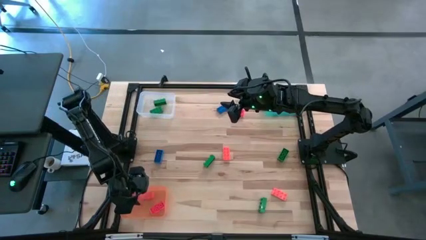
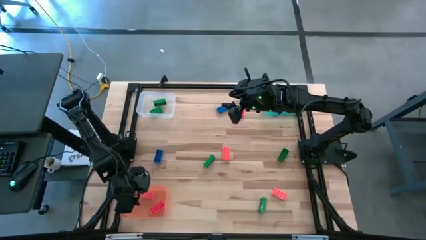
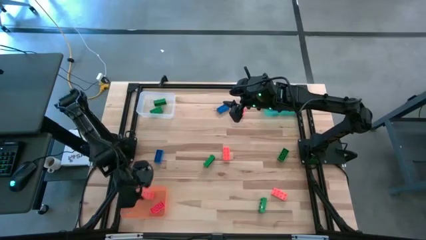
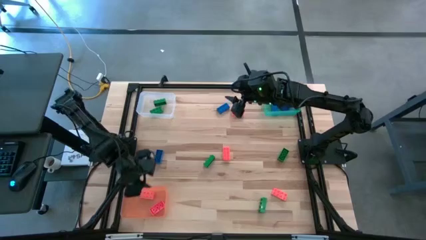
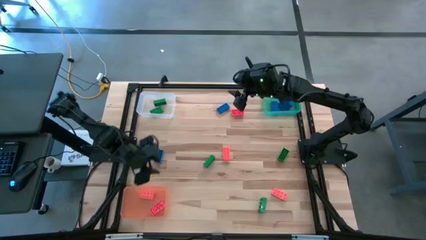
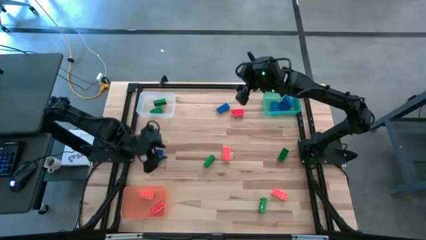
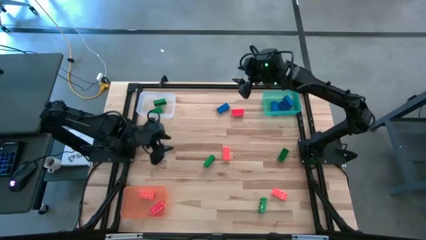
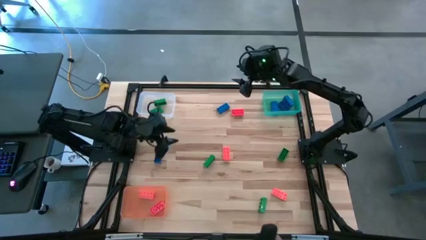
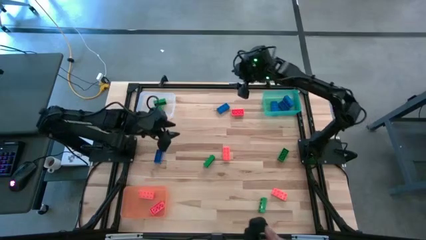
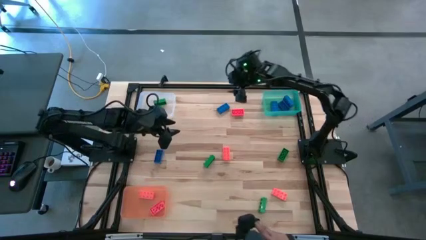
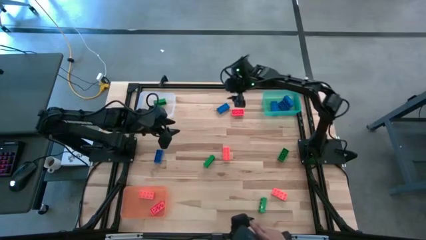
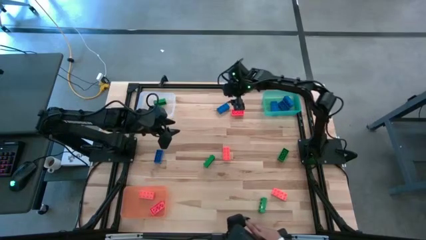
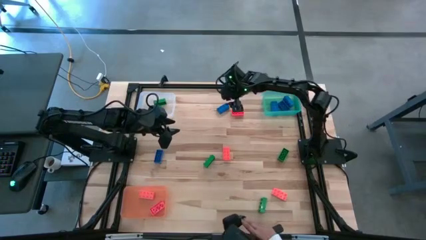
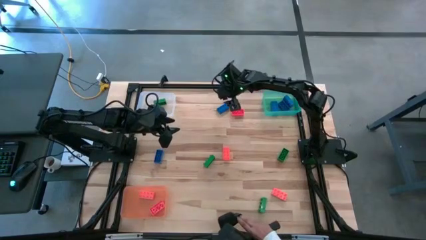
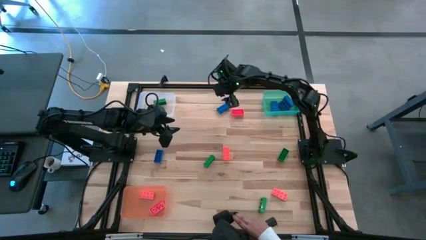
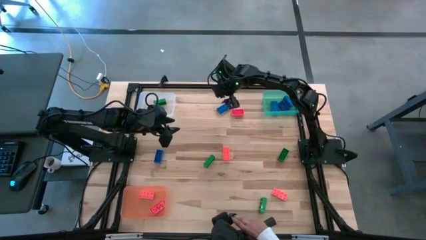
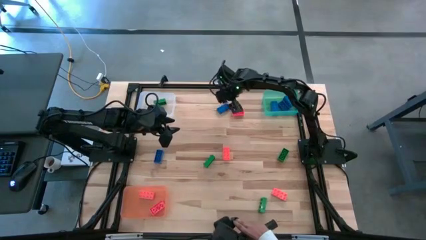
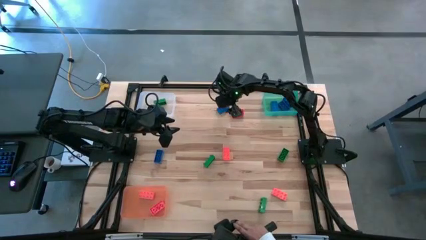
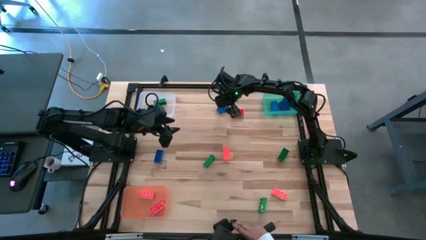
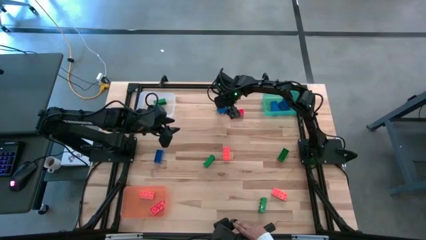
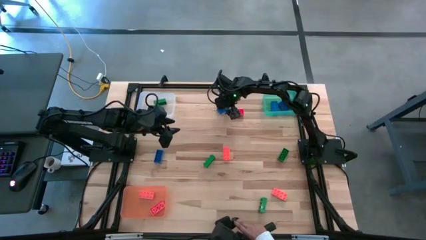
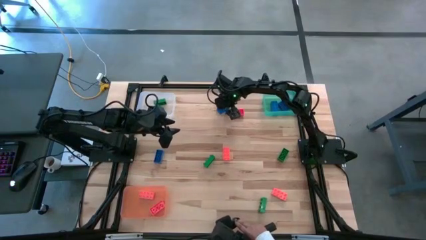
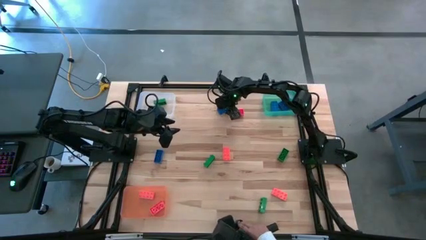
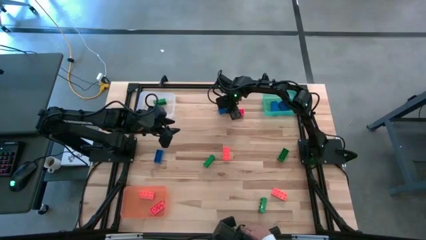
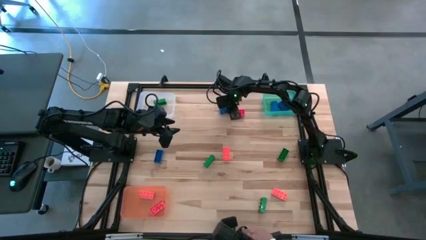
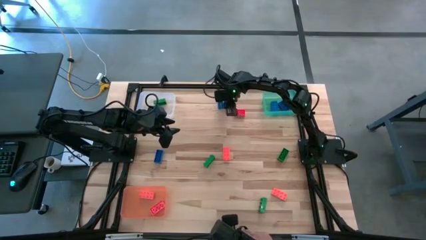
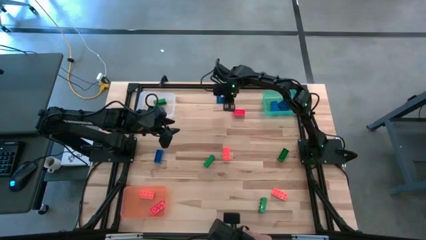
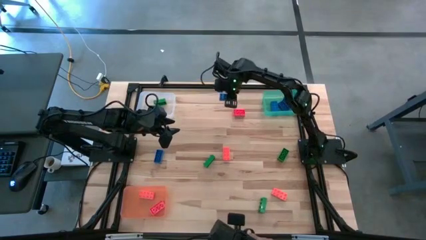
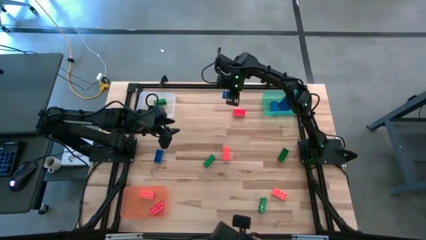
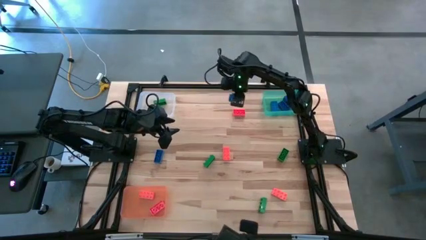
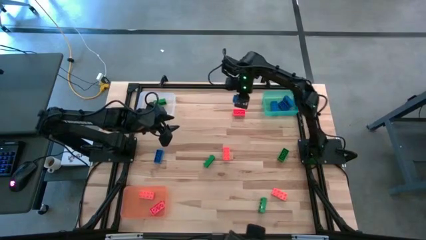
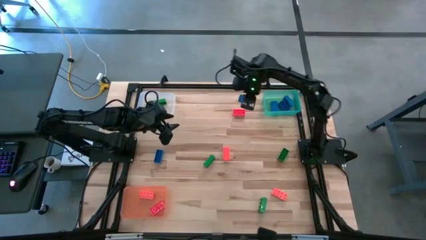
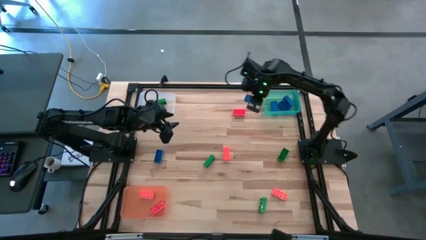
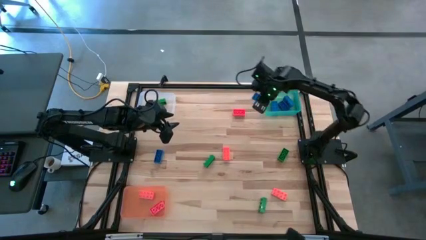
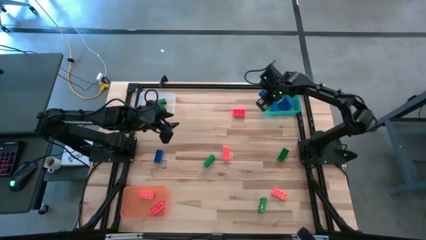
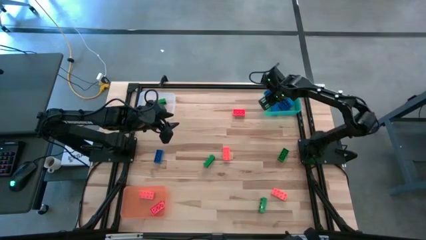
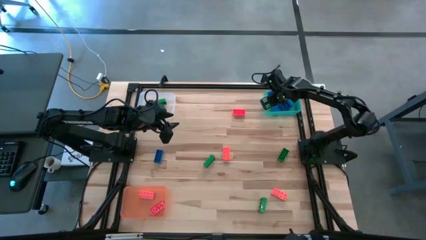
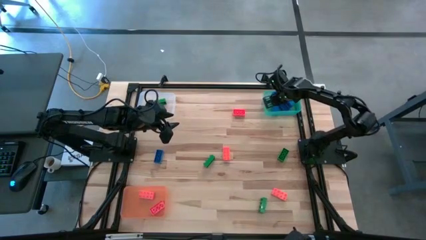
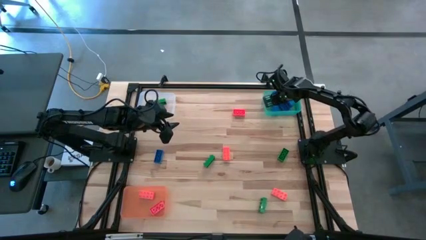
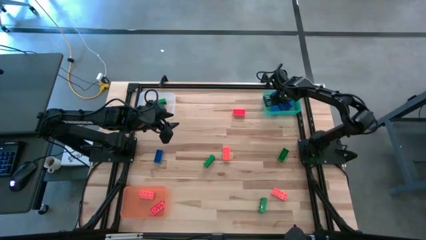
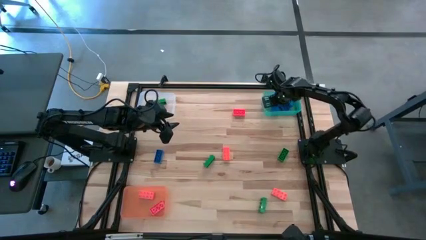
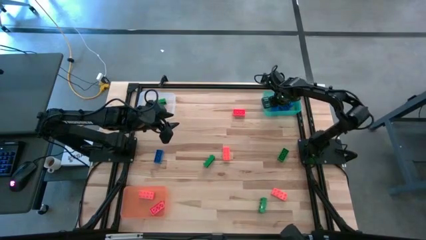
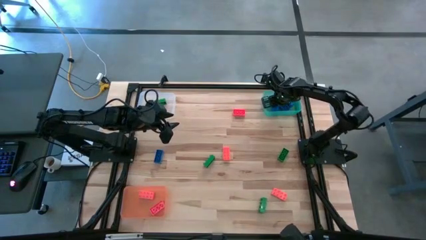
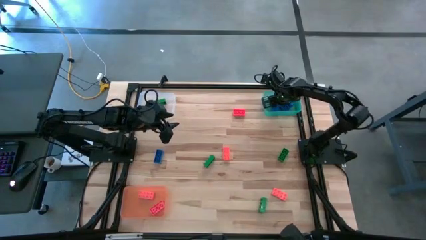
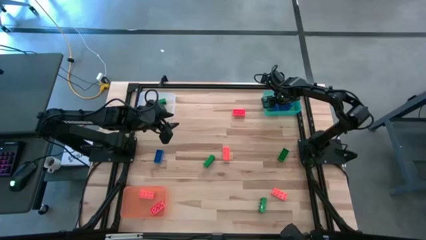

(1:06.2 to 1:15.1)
Task: Sort & place blocks by color
Put the blue game piece into the blue bin

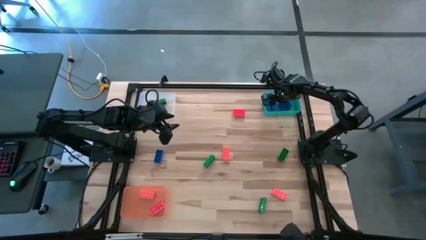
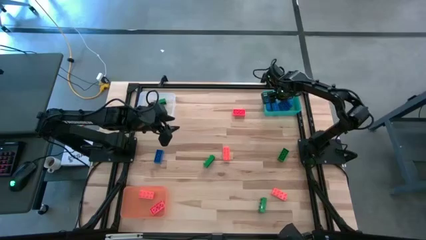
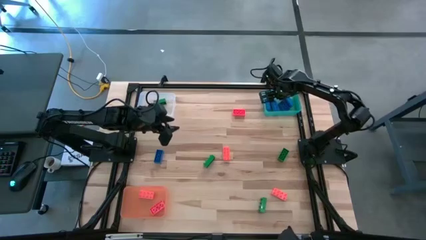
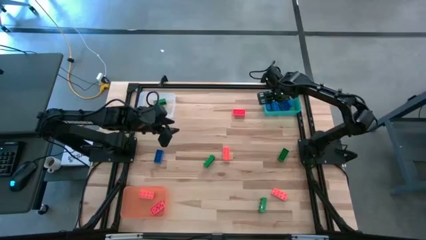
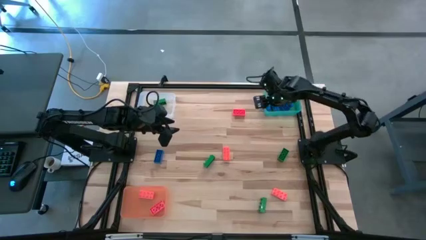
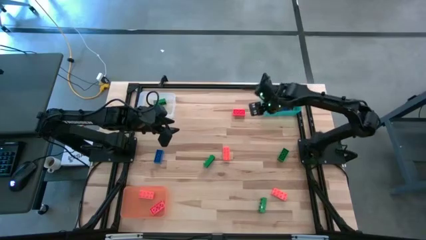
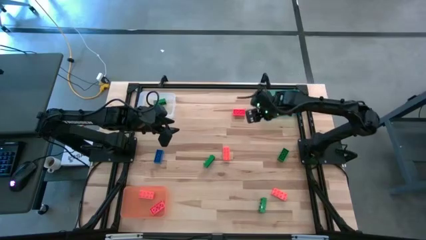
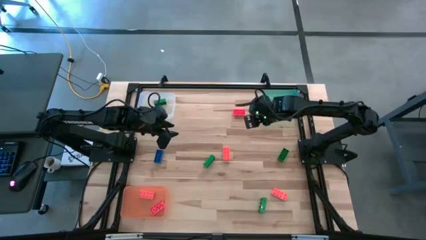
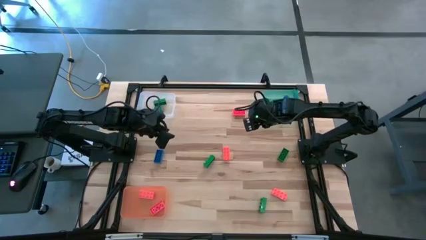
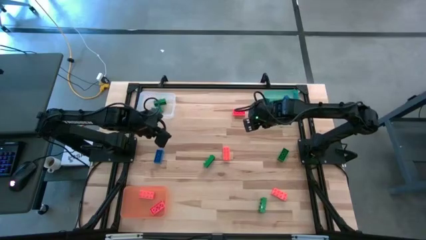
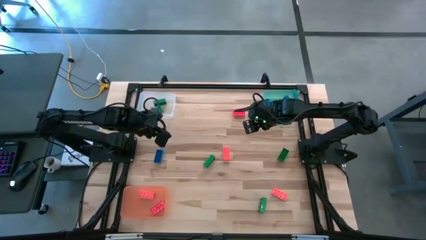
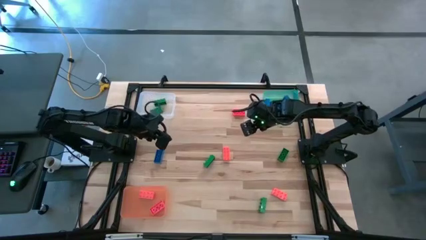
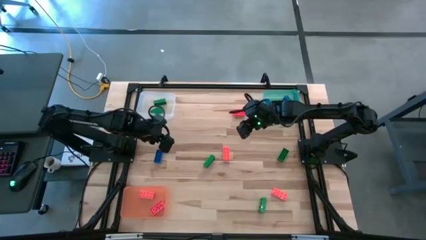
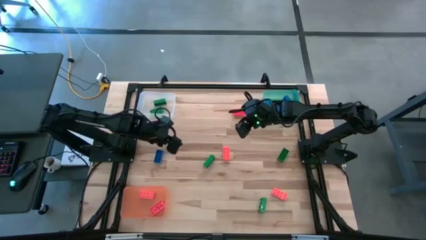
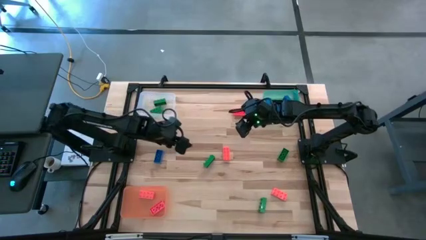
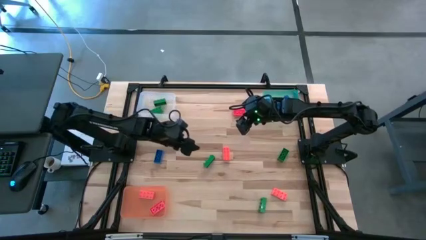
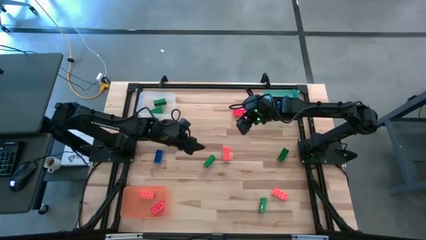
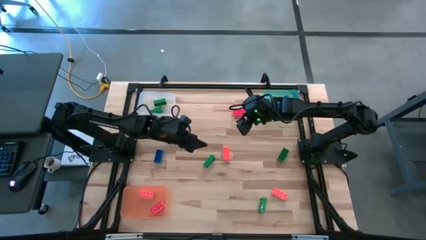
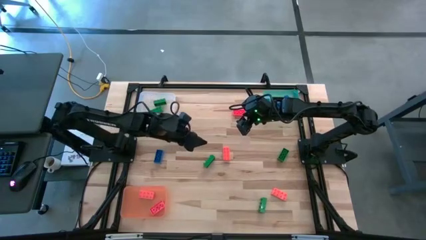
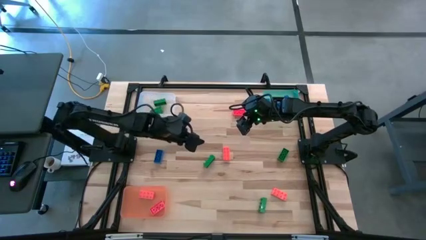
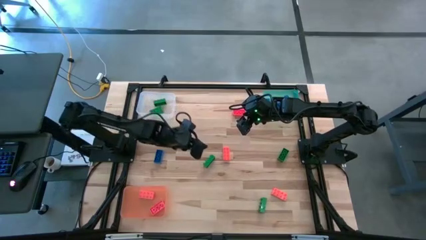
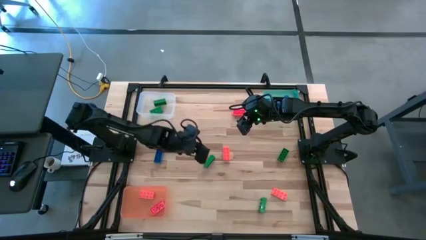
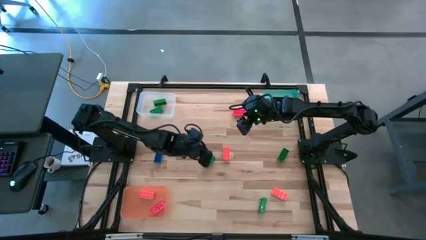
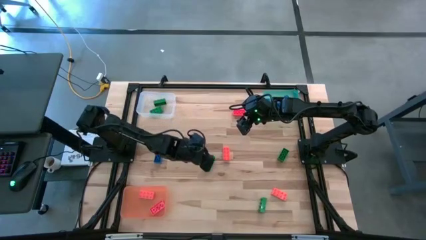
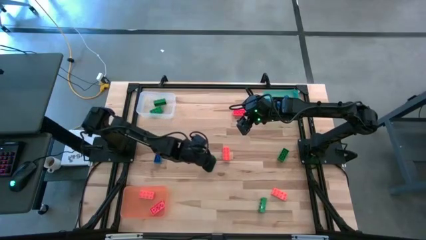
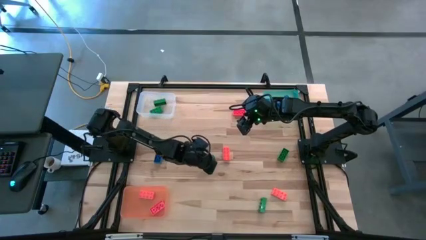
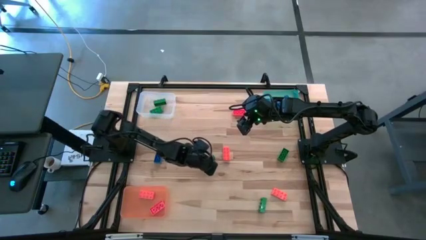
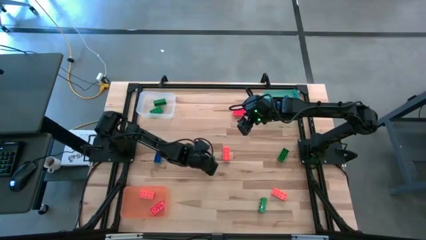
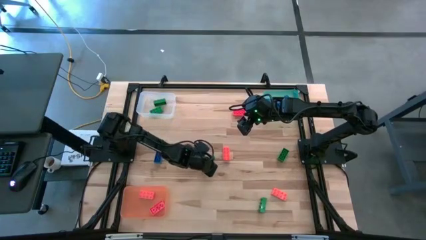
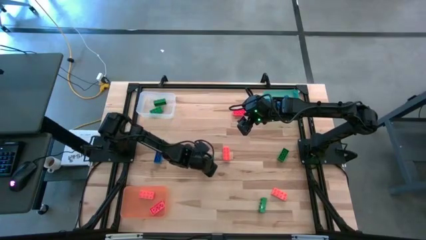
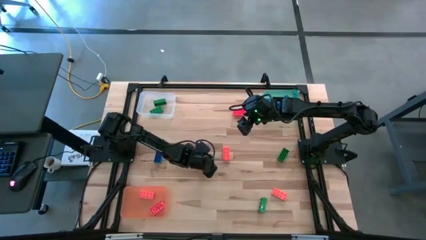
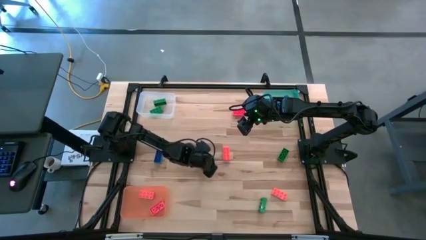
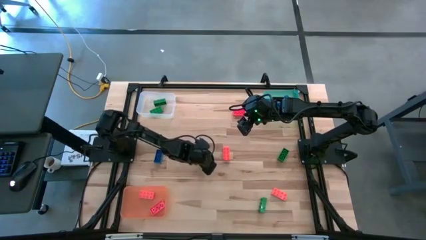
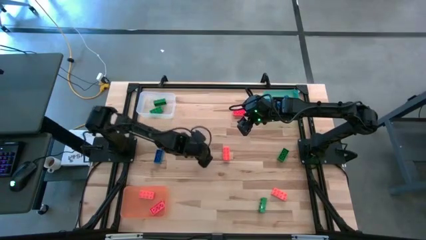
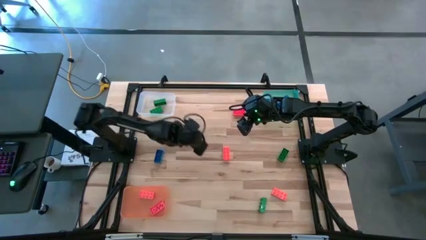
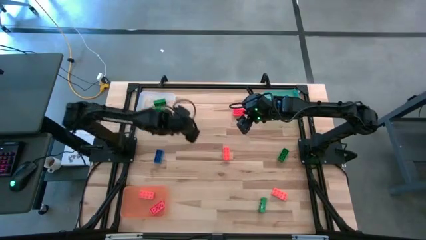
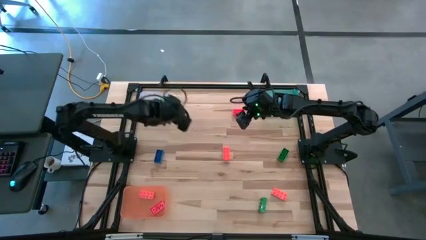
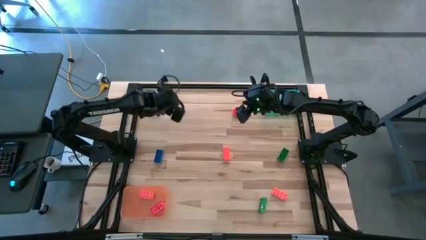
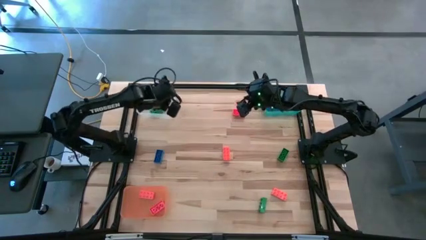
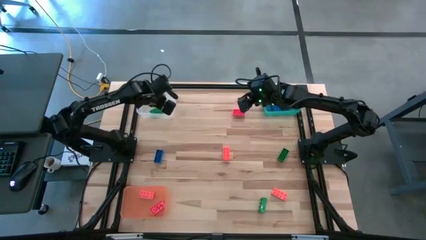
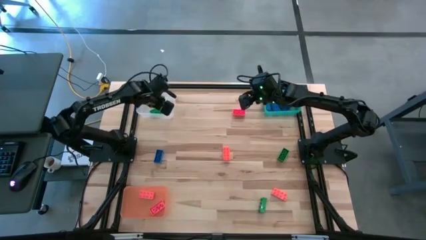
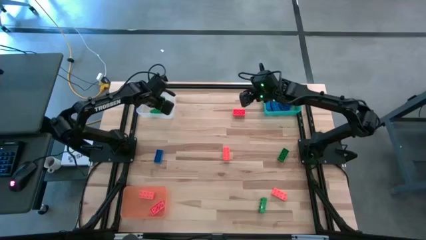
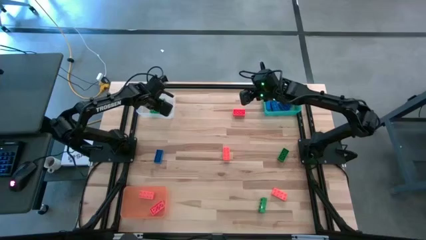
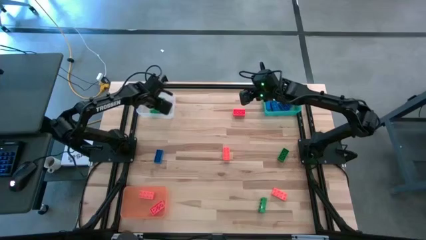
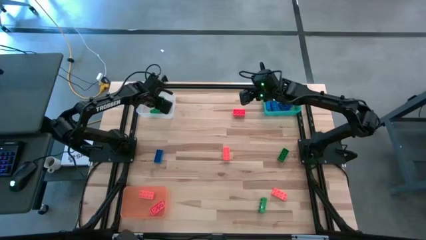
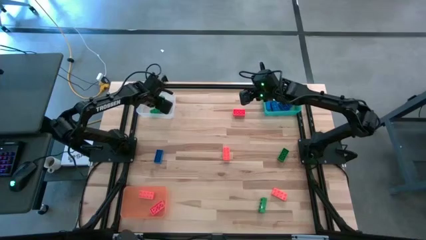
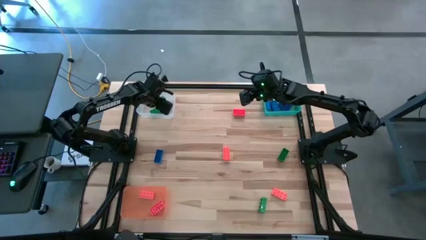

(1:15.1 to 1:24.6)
Put the green game piece into the white bin
